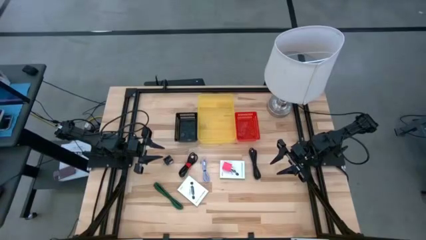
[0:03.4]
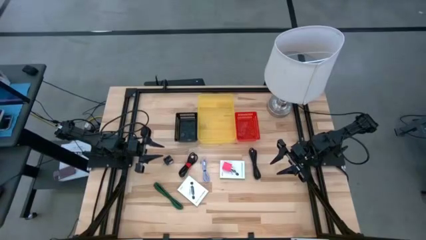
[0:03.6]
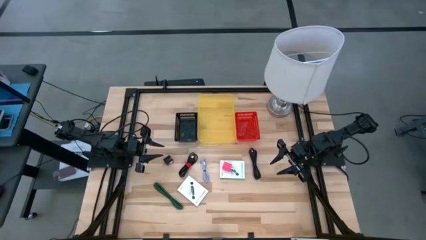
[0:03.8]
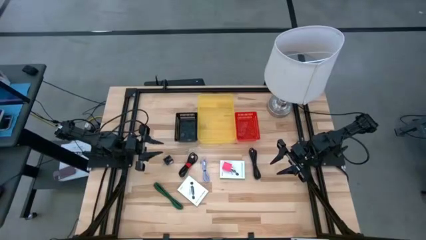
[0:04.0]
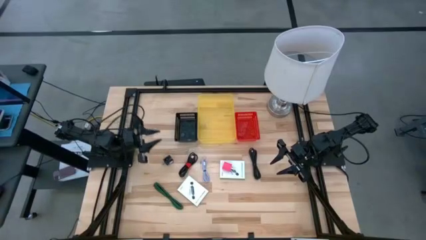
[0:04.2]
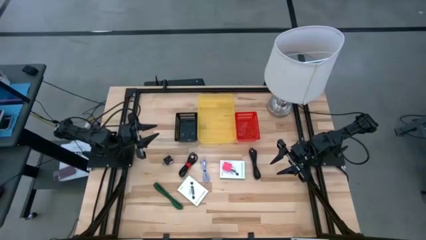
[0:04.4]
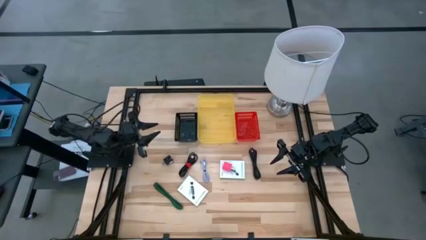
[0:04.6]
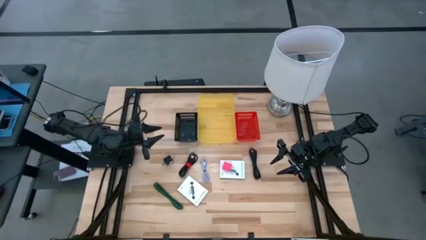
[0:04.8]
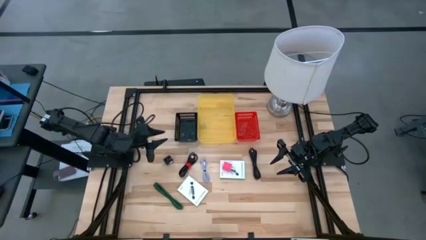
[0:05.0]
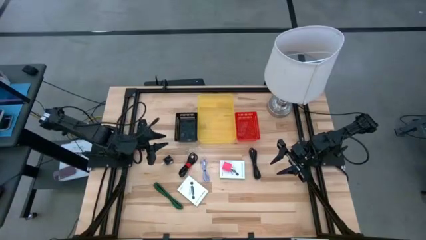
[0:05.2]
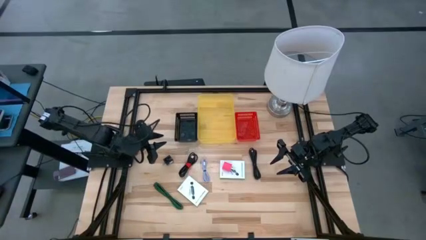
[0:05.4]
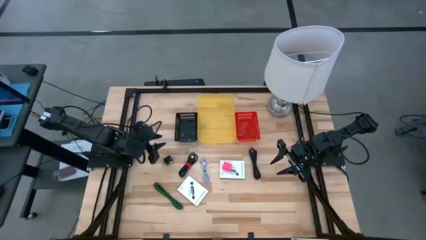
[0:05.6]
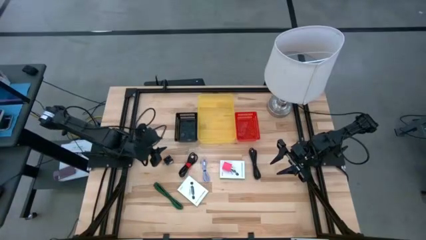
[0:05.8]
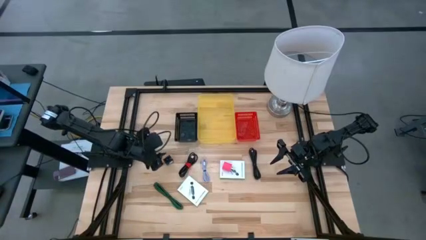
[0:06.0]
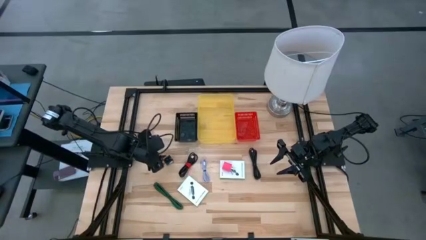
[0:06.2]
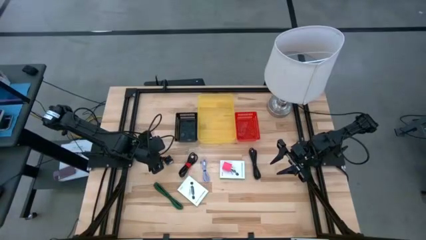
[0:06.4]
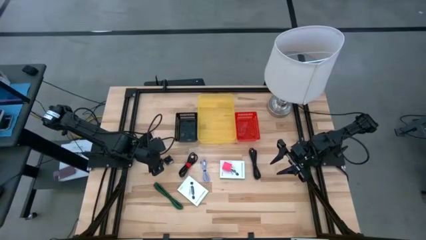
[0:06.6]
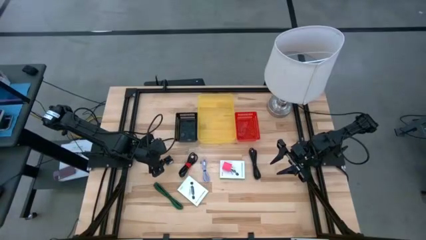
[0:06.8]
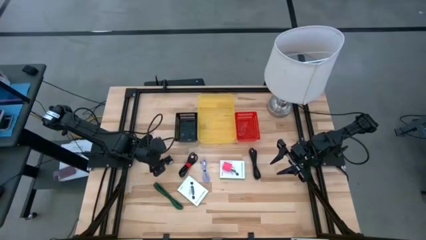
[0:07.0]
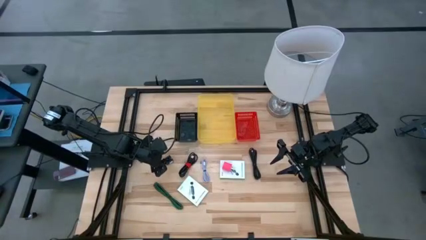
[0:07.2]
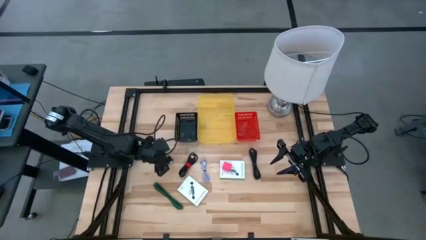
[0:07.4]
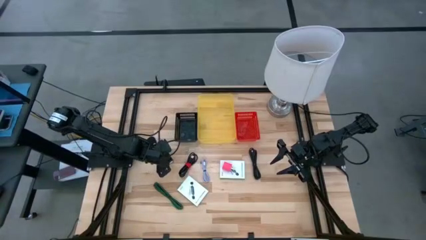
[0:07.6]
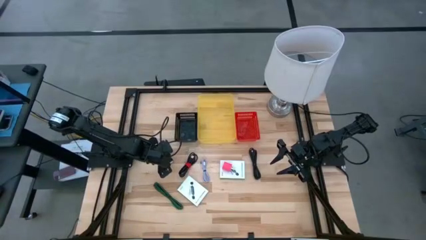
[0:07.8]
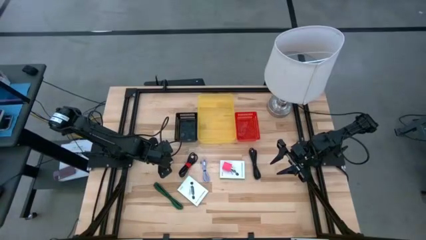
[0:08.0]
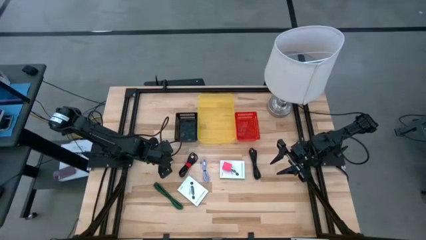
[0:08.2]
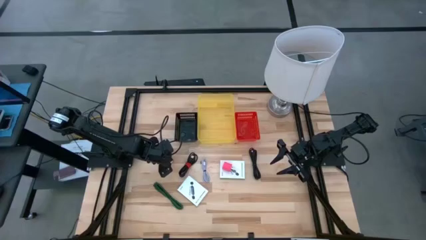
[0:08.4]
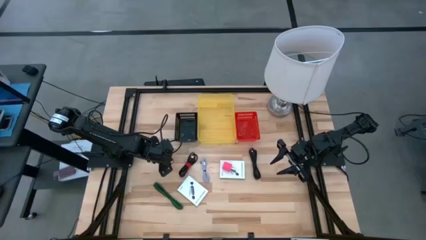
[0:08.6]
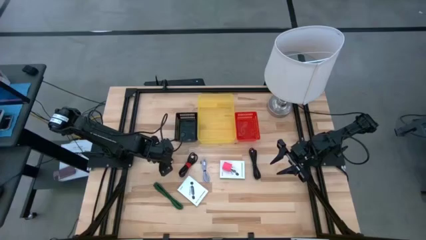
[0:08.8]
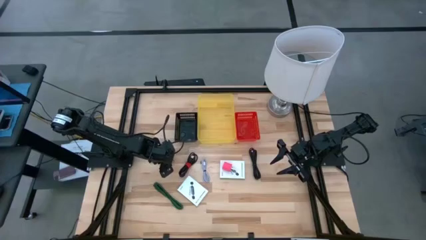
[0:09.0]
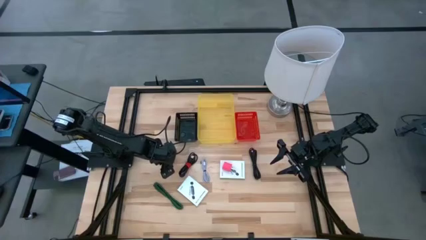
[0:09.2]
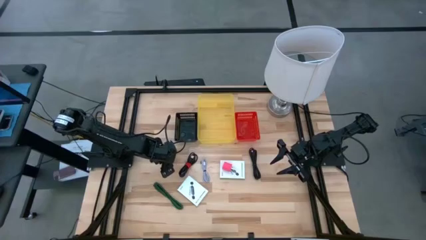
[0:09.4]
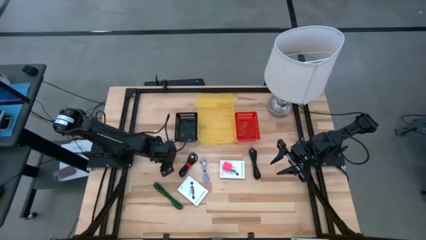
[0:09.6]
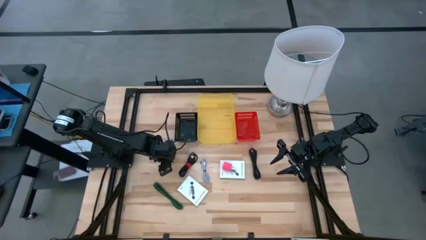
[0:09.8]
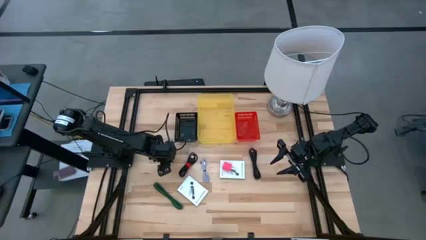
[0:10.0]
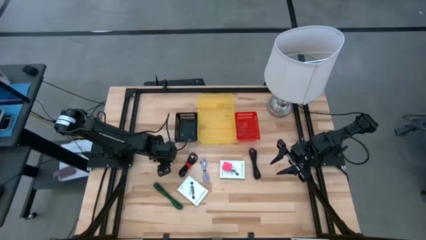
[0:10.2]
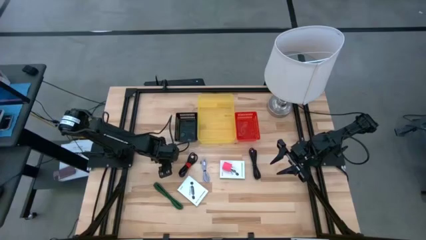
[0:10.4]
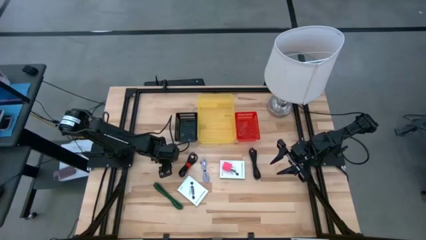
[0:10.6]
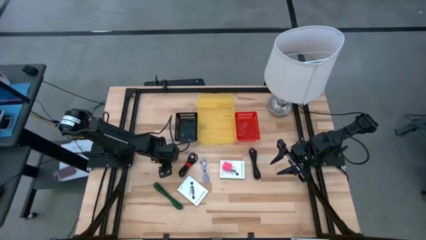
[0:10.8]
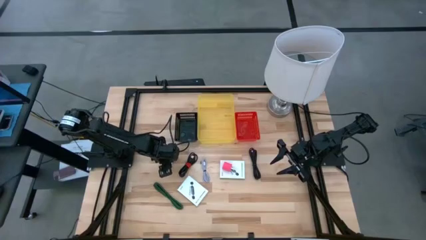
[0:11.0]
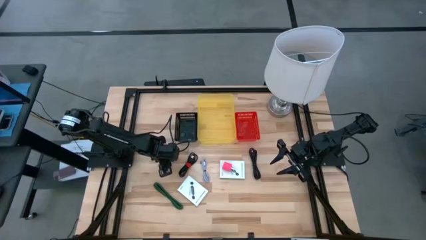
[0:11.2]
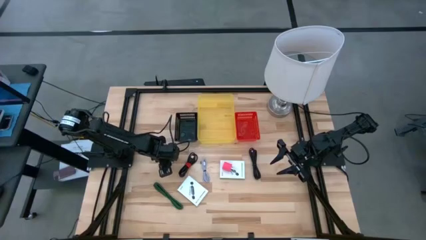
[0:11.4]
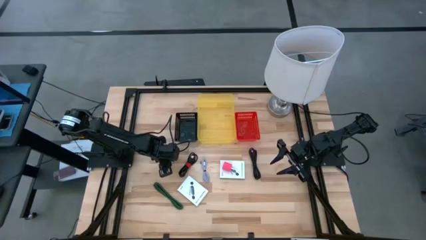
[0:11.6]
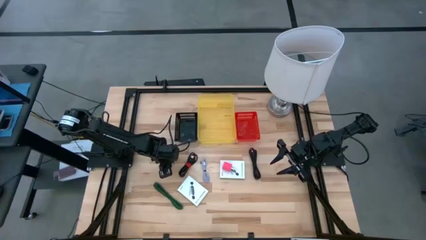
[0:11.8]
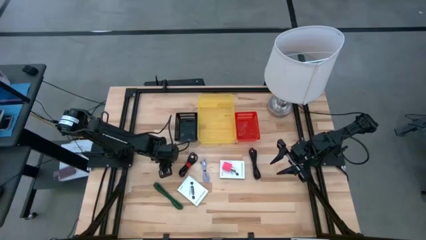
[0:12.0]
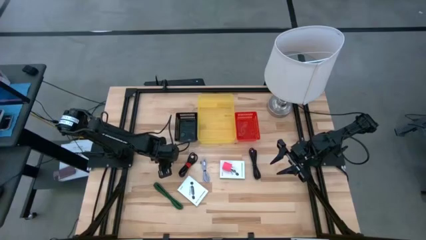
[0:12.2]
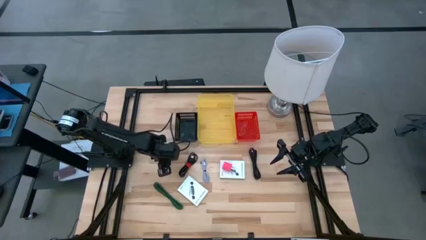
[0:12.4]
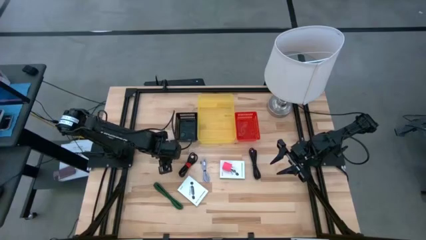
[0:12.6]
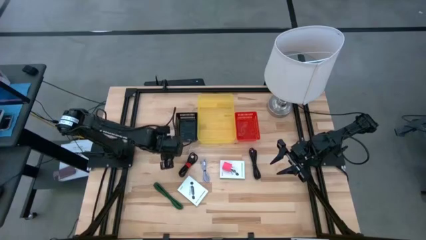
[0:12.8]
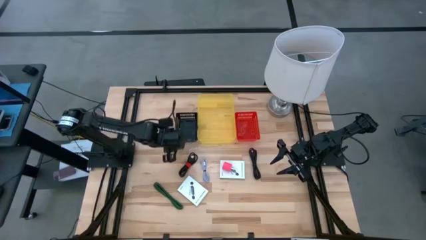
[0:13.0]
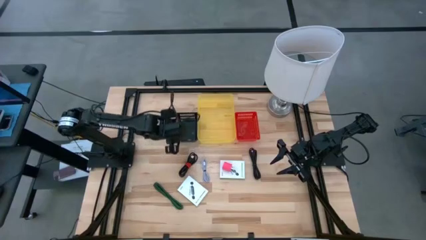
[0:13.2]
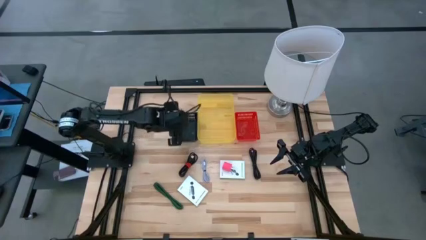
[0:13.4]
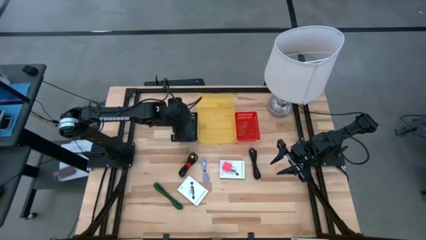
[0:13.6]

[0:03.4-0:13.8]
Task: Pick and place items into bin
Put the black charger adapter into the black bin
